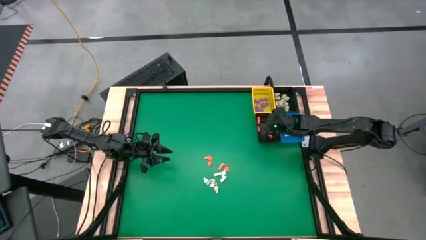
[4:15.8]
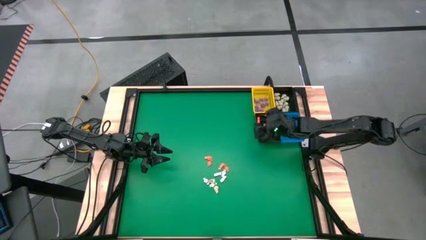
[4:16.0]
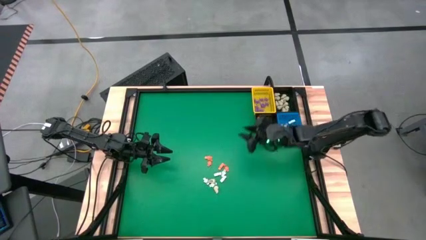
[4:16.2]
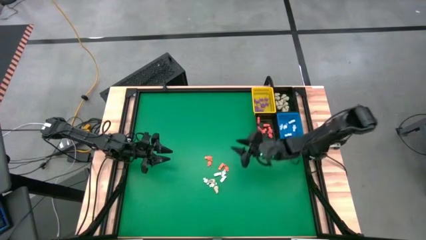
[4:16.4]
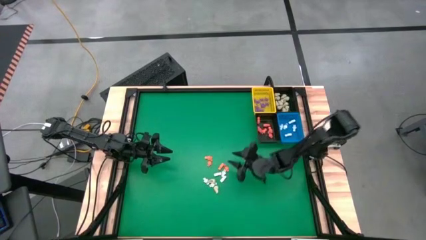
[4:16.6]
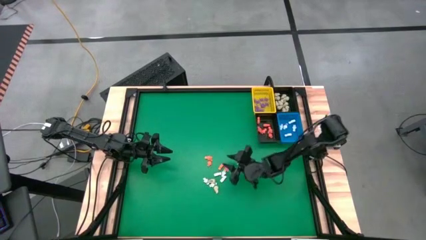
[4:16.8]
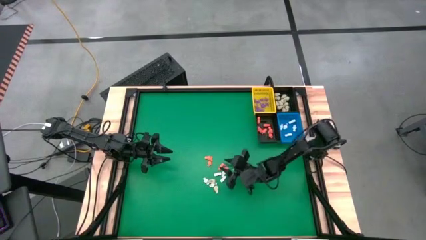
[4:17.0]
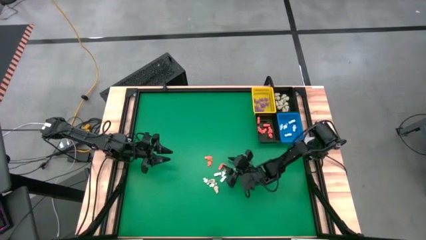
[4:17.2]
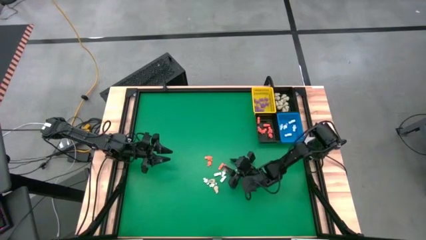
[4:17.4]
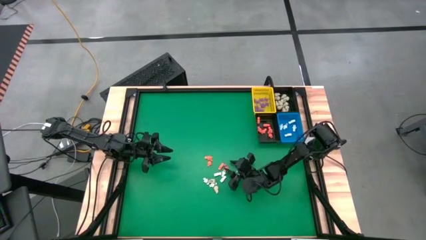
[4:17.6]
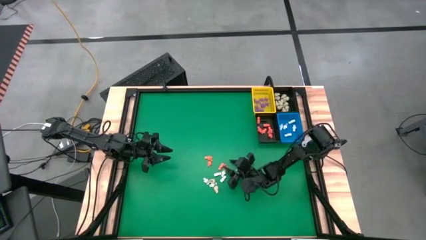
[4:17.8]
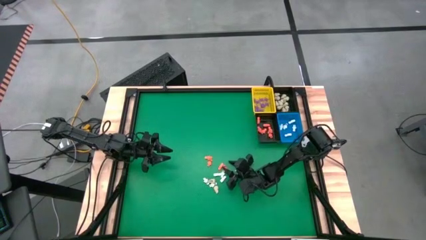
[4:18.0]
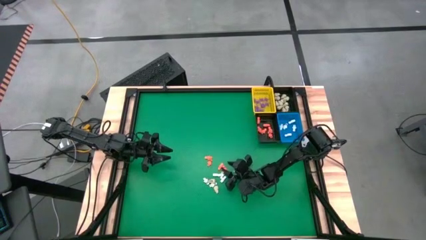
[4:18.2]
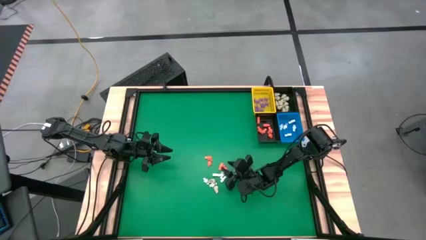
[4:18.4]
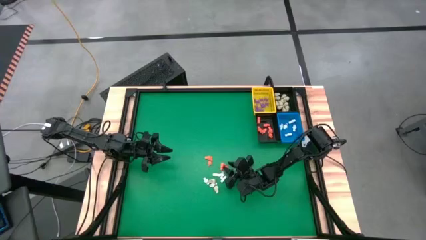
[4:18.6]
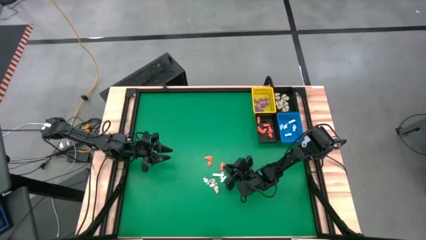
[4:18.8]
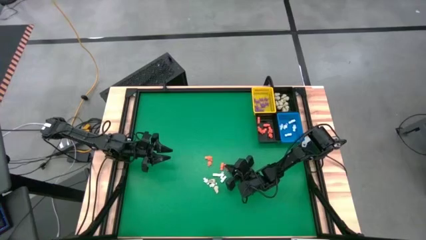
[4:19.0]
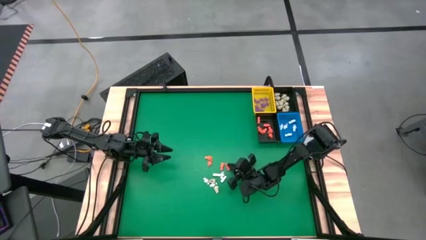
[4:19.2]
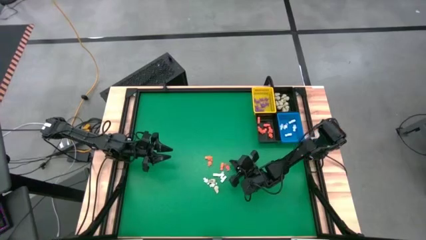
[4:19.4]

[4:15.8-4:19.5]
Task: Sort Halloween decoration
Put the orange skeleton toy into the bottom black basket

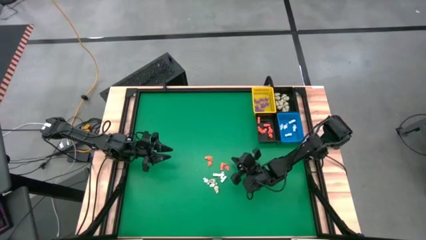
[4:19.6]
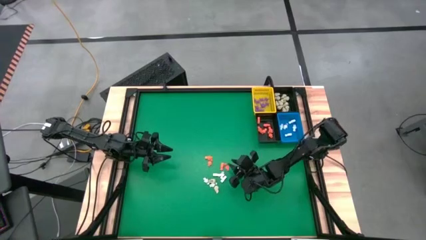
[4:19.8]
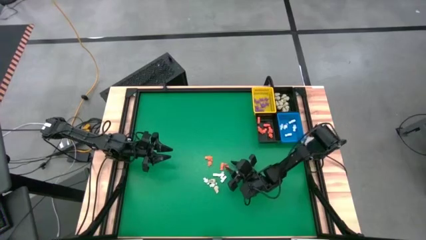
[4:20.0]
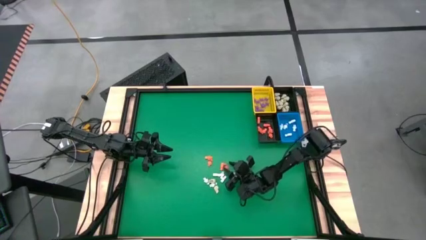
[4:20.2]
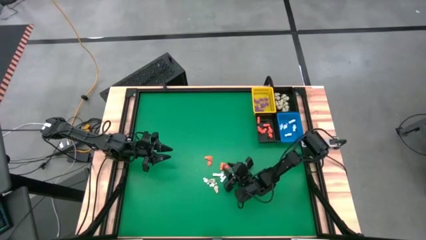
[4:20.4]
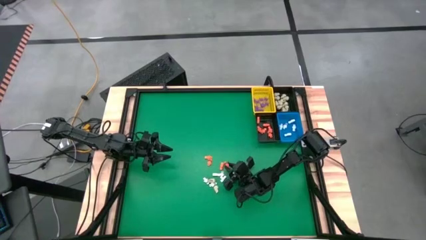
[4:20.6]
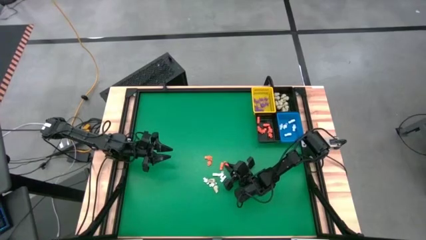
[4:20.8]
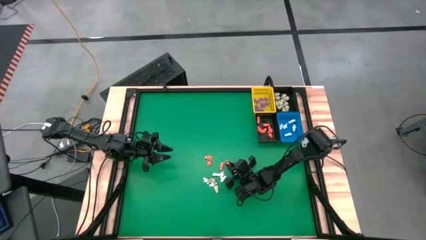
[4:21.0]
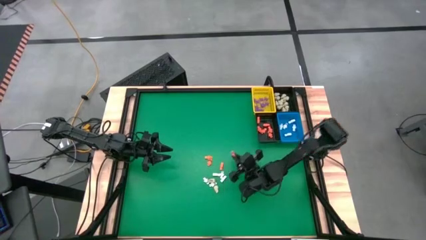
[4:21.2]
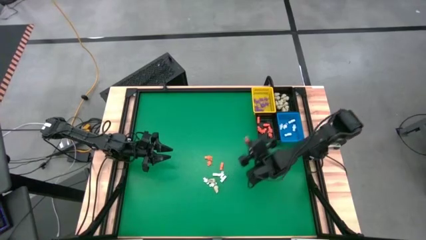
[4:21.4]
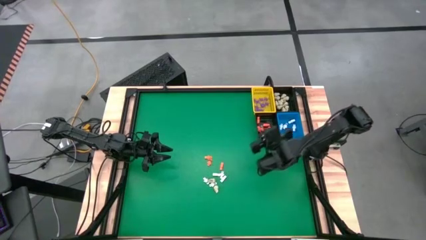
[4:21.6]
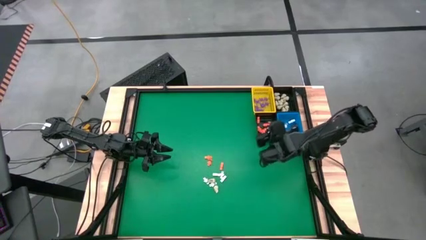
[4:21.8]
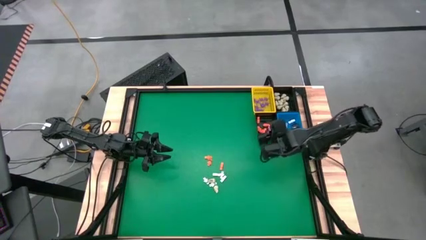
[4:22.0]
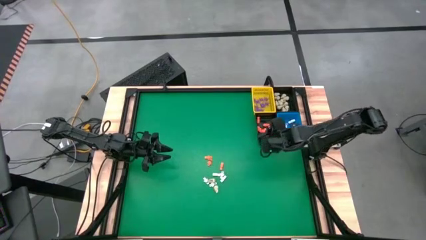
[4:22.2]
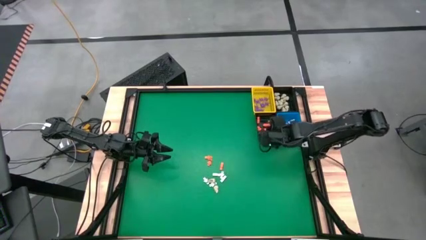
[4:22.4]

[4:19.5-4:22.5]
Put the orange skeleton toy into the bottom black basket

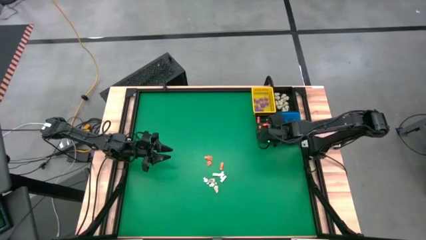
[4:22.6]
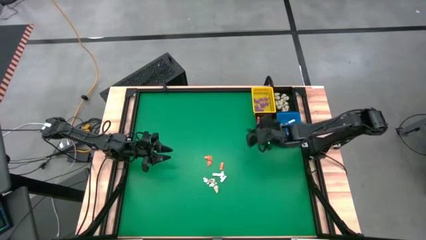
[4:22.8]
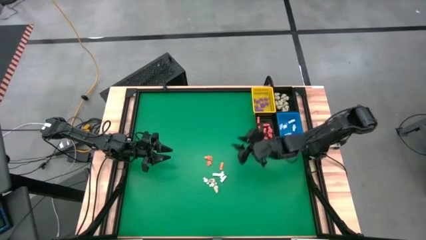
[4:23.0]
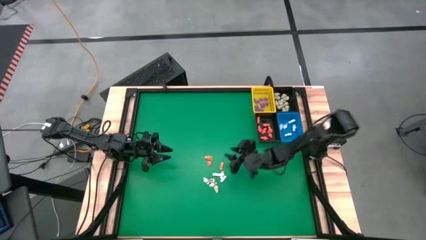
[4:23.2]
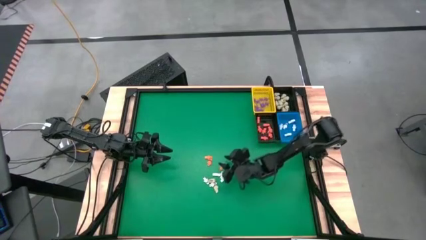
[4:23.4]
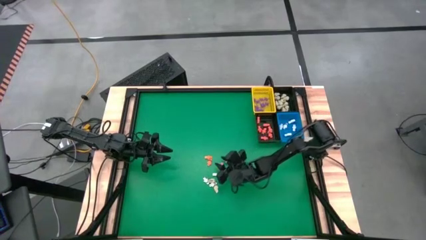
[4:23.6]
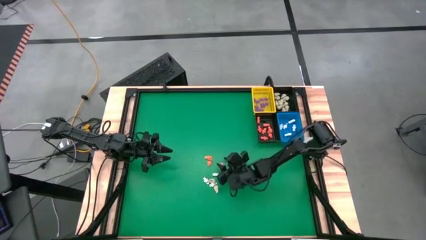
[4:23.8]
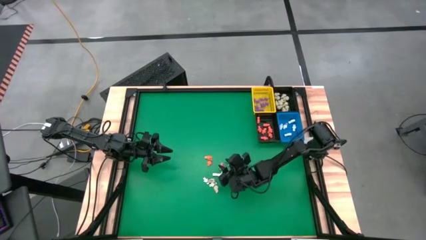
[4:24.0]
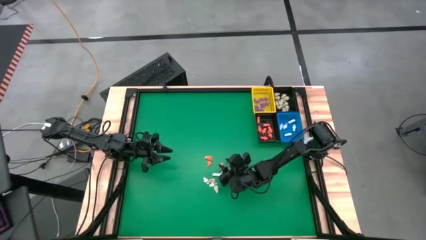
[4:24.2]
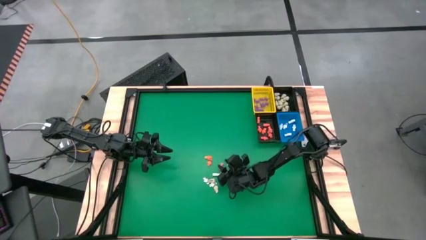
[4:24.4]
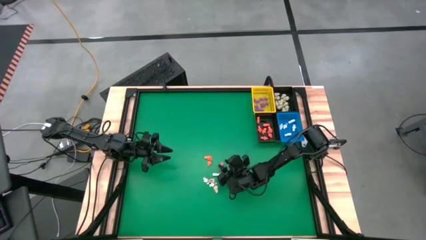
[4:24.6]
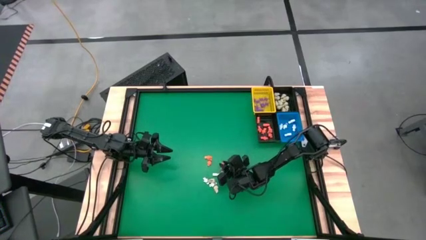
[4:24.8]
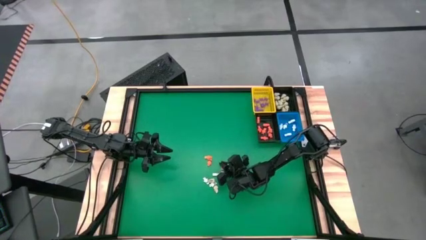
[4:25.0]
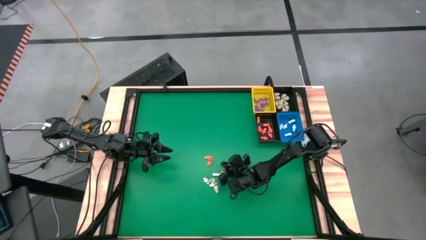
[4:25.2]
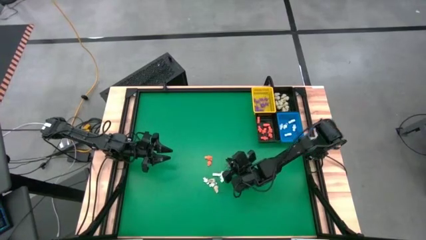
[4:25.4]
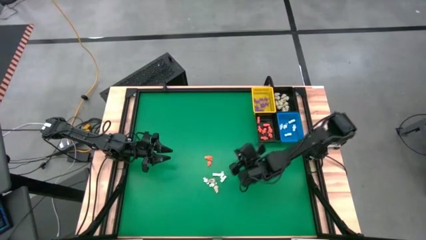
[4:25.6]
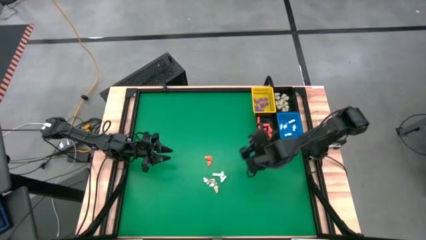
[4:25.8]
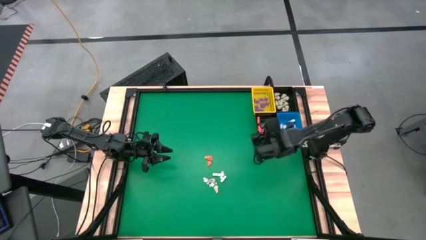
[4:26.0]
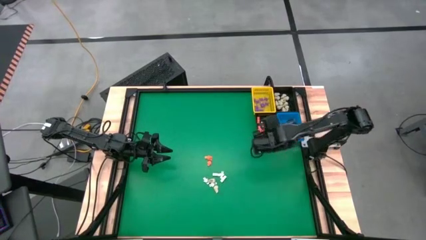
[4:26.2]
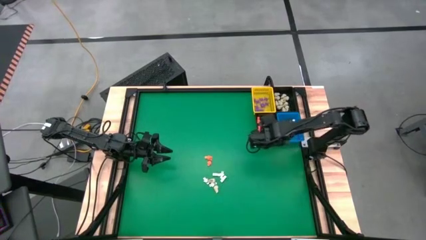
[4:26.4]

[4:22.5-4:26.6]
Put the orange skeleton toy into the bottom black basket

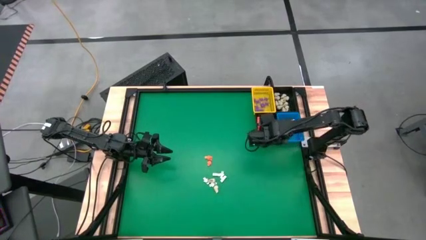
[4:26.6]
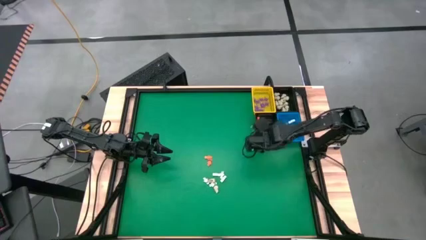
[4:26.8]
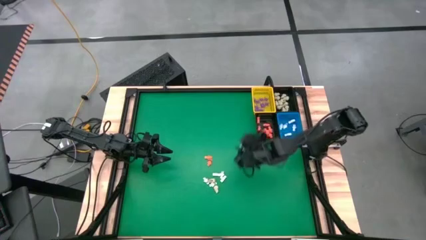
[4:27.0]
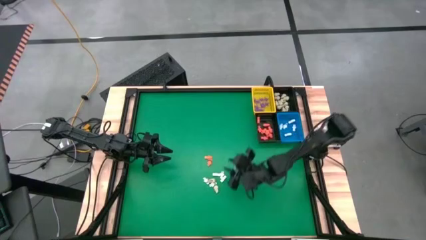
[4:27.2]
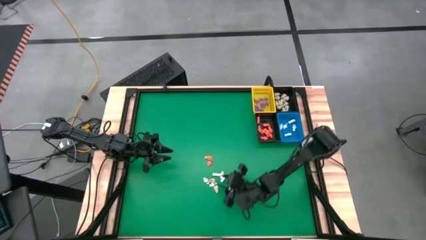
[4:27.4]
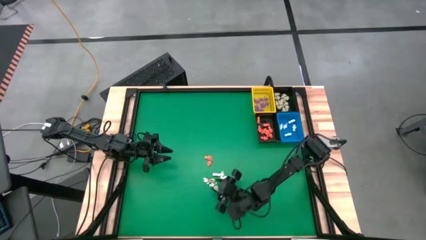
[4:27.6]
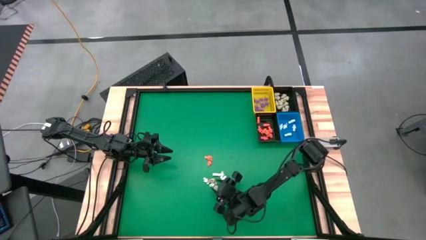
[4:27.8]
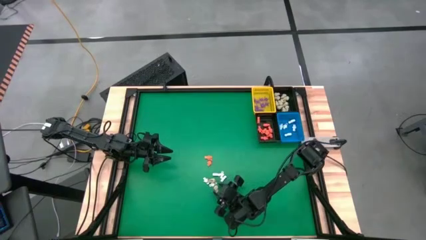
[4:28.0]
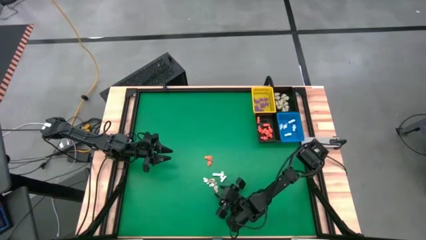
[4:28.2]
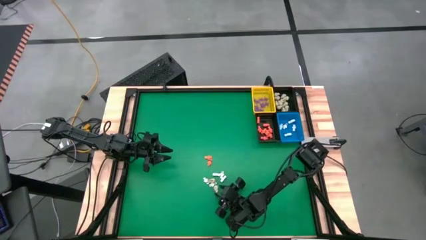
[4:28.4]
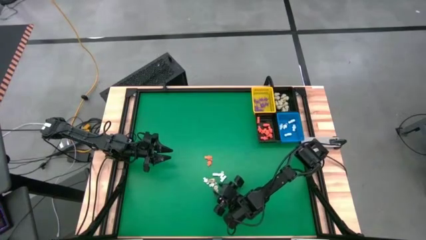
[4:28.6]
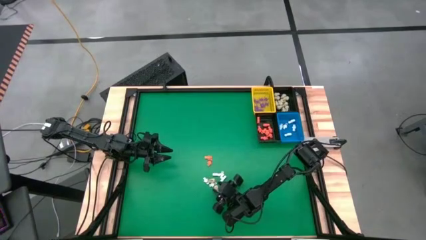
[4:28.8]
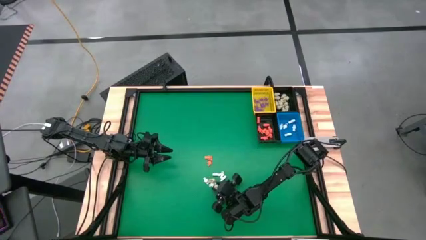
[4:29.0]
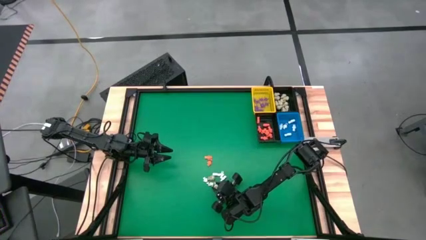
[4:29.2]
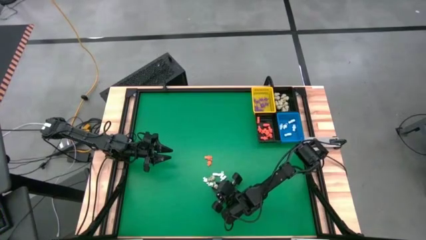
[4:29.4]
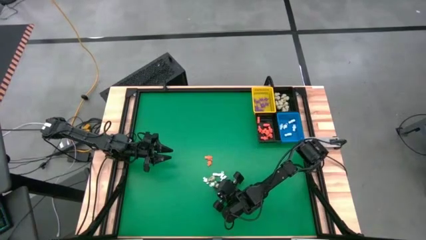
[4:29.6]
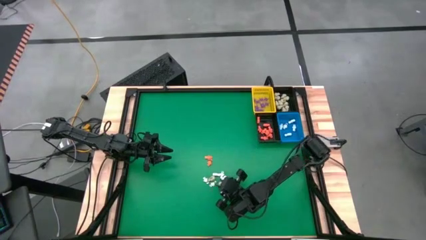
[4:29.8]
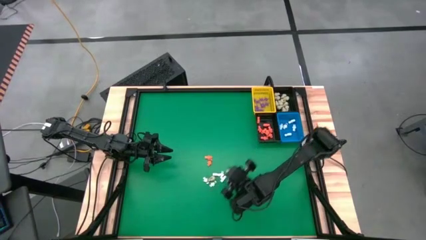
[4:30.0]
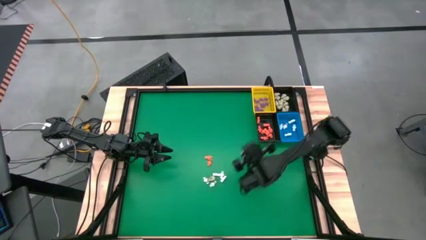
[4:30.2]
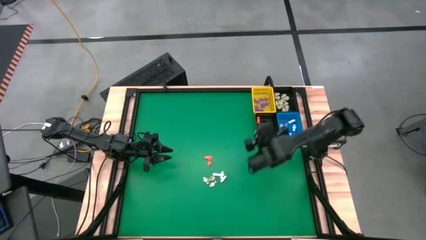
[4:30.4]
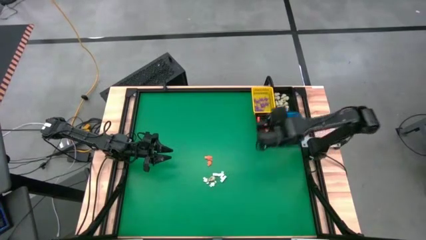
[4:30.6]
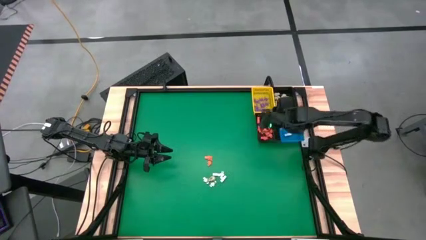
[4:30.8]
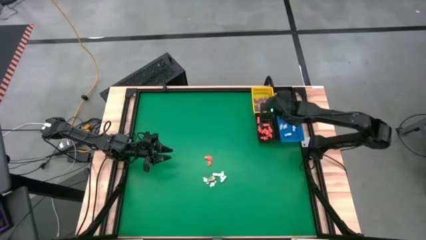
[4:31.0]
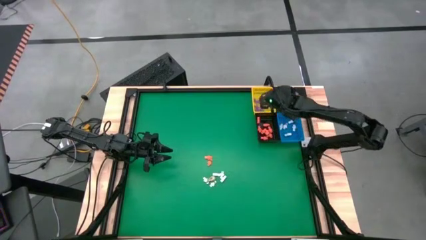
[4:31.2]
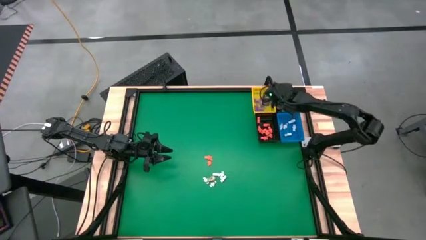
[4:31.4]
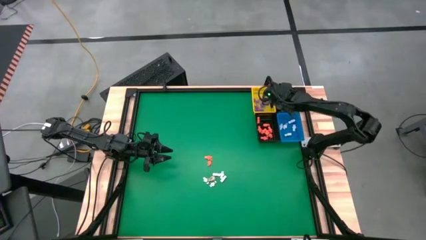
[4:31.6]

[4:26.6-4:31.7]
Put the gray skull toy into the top black basket
